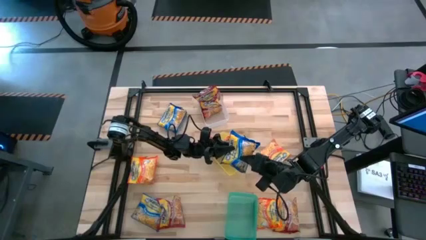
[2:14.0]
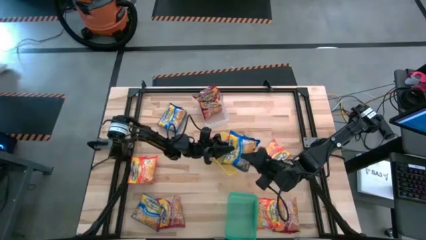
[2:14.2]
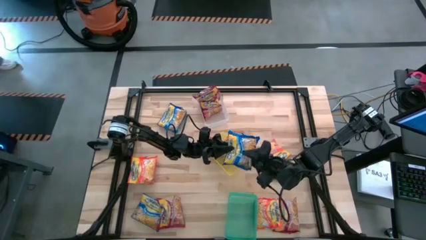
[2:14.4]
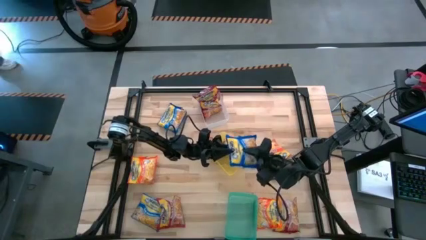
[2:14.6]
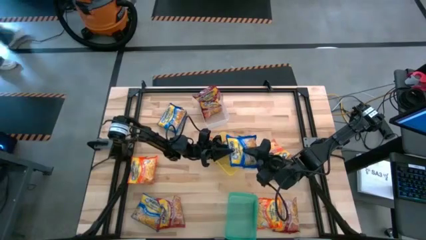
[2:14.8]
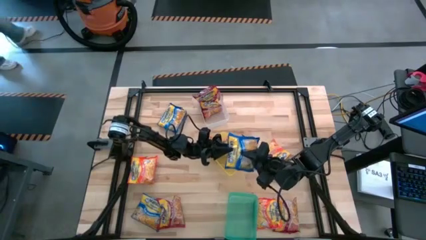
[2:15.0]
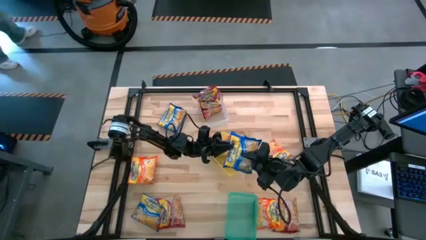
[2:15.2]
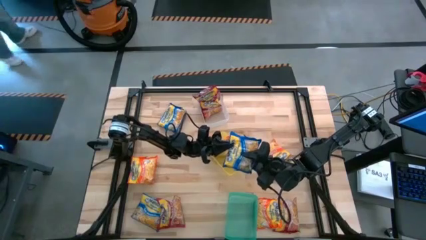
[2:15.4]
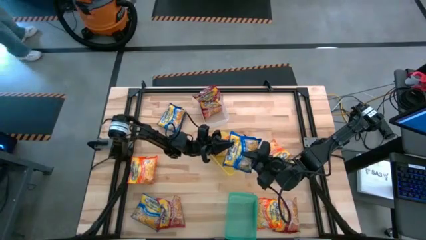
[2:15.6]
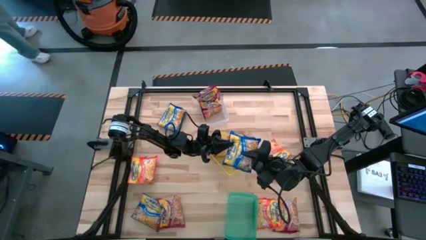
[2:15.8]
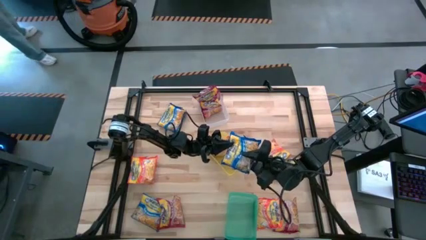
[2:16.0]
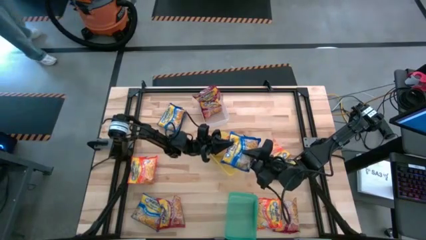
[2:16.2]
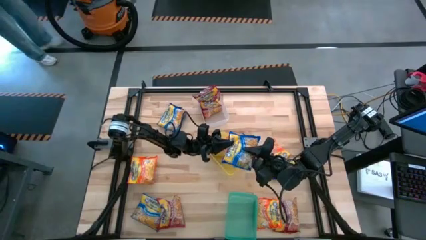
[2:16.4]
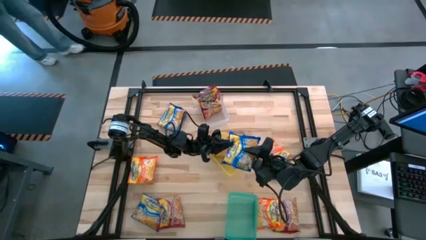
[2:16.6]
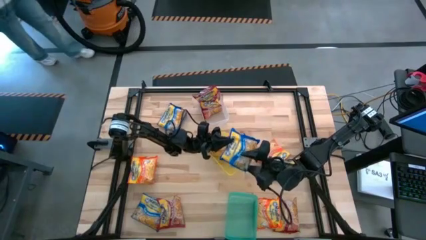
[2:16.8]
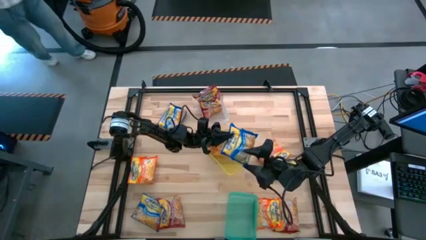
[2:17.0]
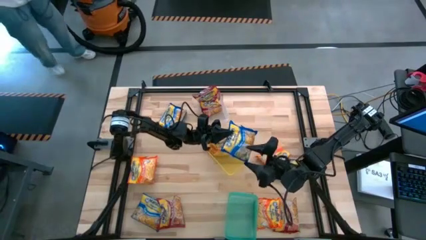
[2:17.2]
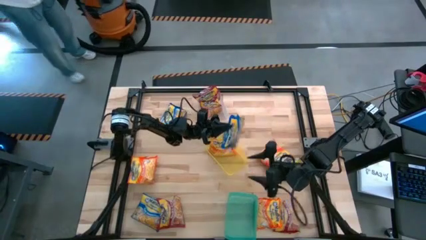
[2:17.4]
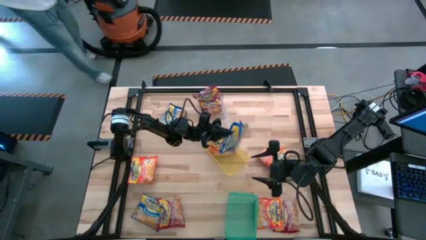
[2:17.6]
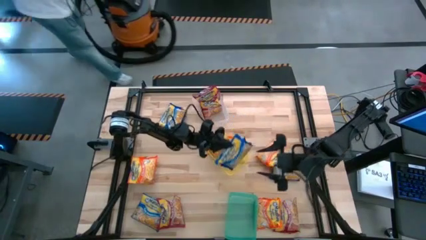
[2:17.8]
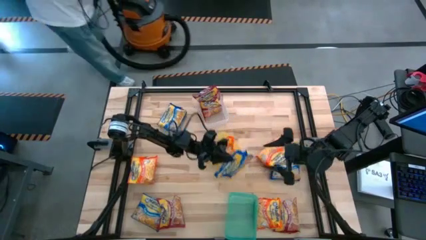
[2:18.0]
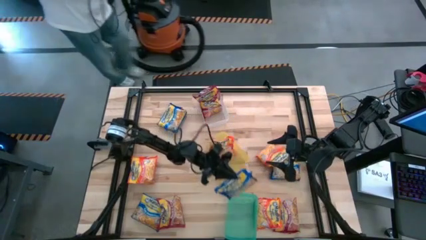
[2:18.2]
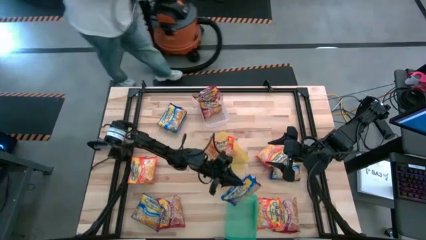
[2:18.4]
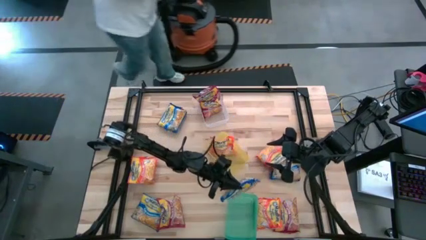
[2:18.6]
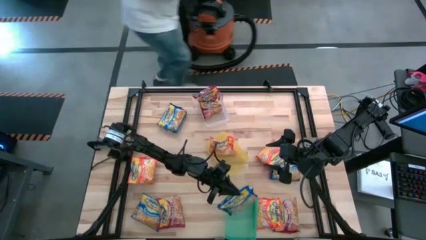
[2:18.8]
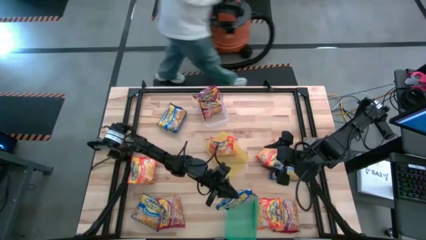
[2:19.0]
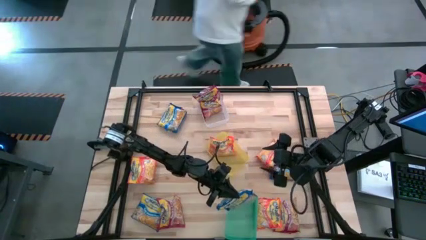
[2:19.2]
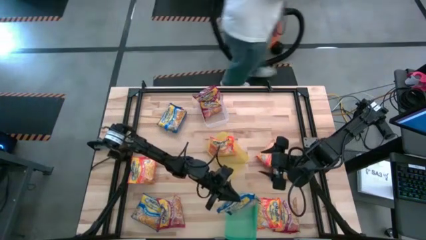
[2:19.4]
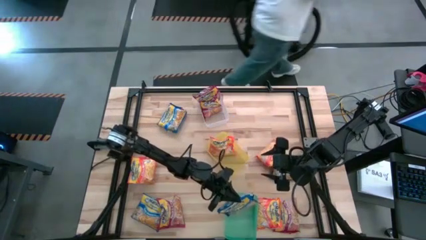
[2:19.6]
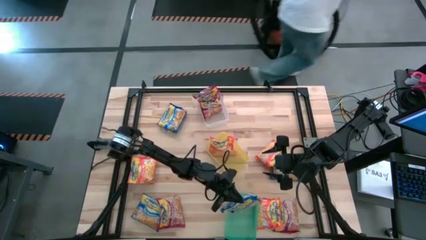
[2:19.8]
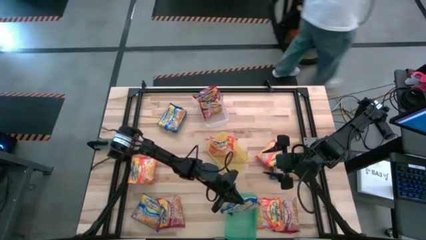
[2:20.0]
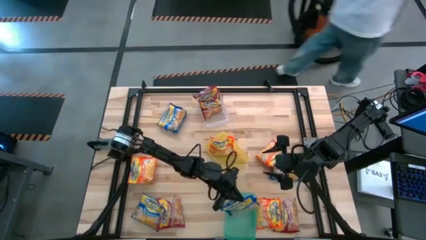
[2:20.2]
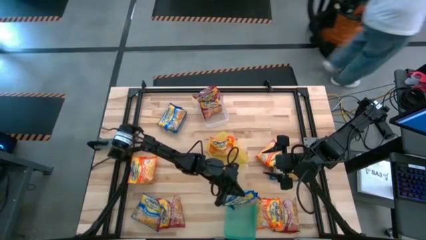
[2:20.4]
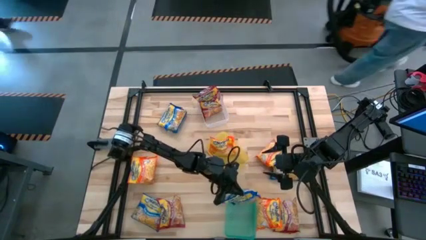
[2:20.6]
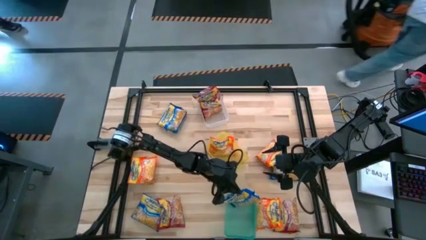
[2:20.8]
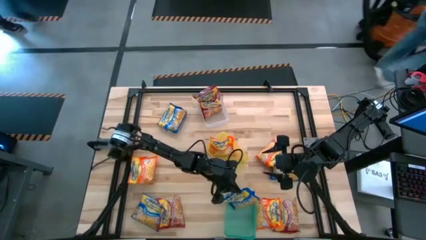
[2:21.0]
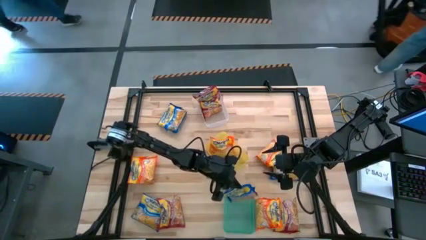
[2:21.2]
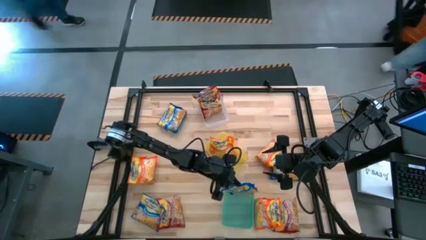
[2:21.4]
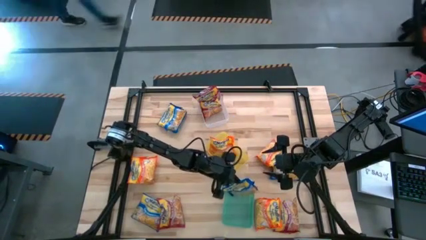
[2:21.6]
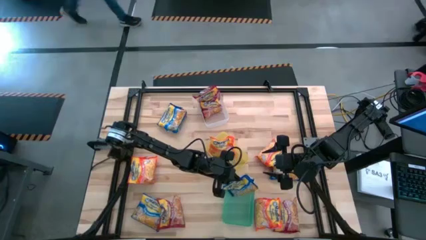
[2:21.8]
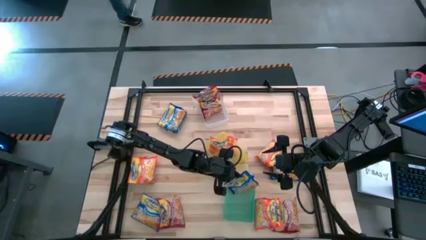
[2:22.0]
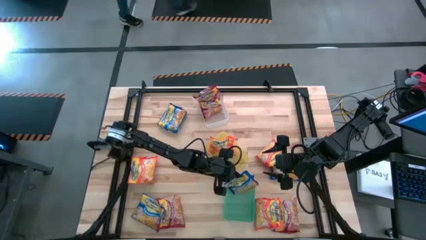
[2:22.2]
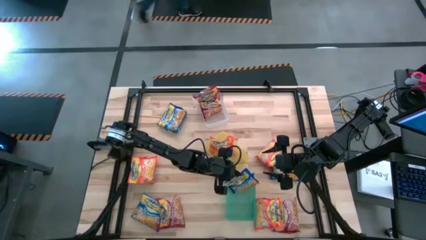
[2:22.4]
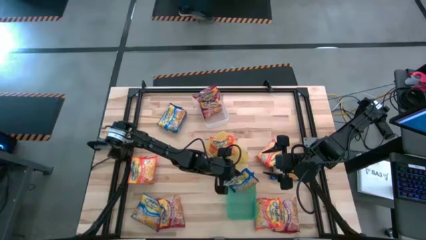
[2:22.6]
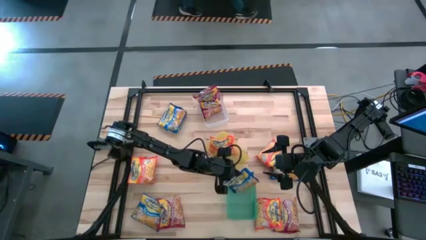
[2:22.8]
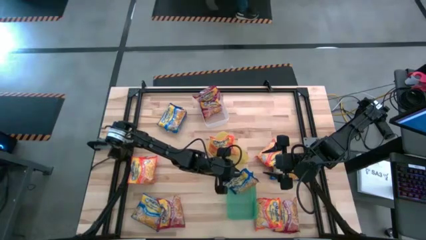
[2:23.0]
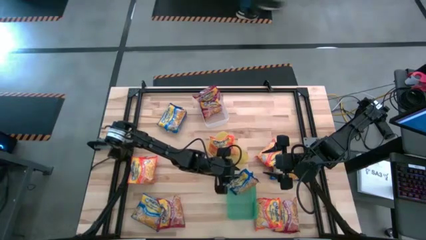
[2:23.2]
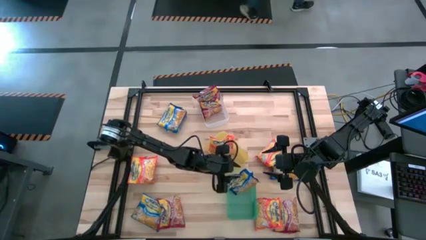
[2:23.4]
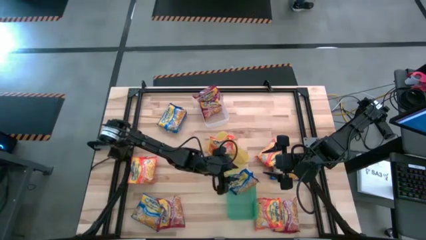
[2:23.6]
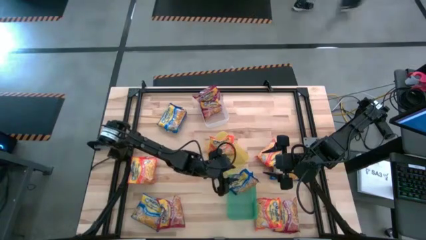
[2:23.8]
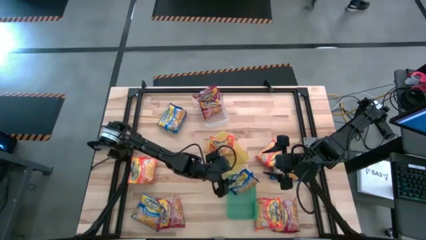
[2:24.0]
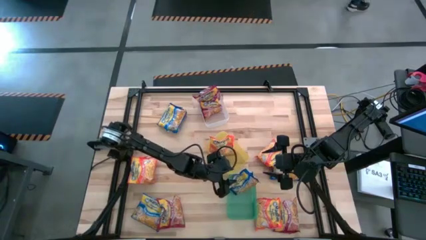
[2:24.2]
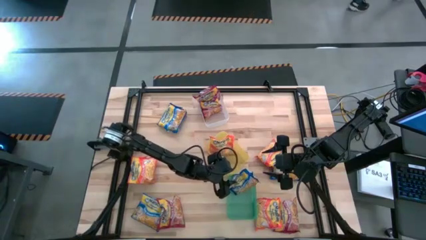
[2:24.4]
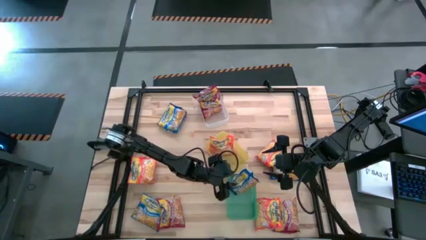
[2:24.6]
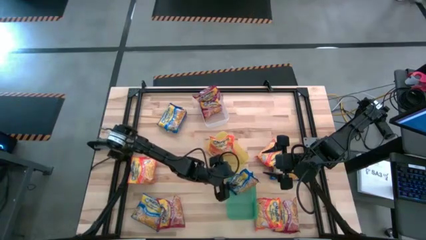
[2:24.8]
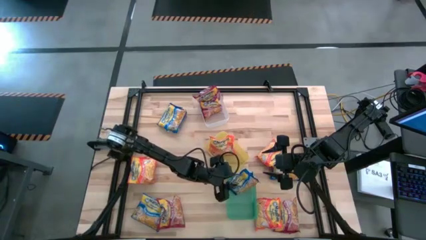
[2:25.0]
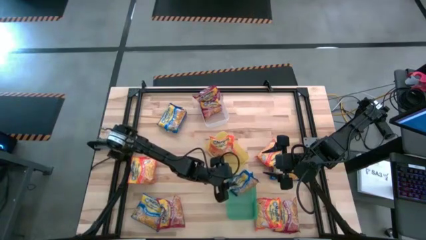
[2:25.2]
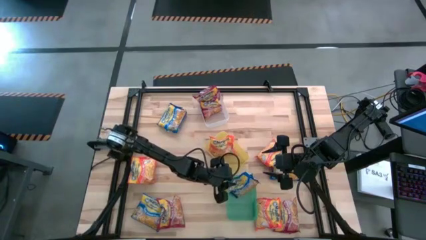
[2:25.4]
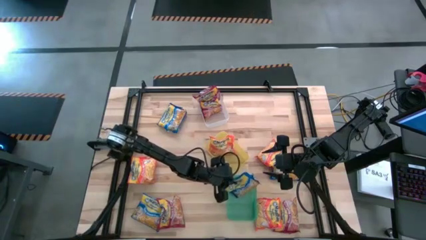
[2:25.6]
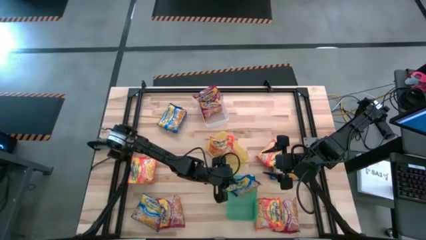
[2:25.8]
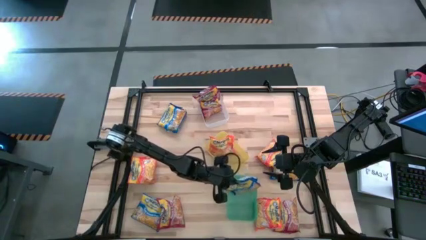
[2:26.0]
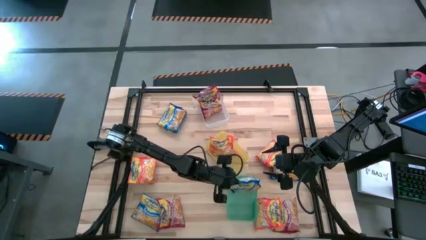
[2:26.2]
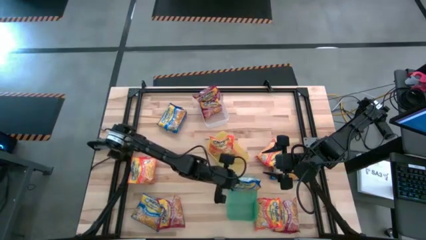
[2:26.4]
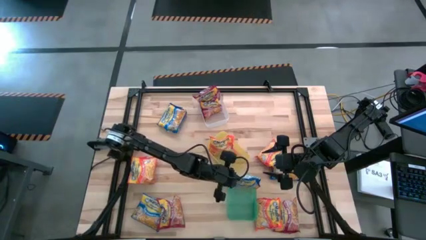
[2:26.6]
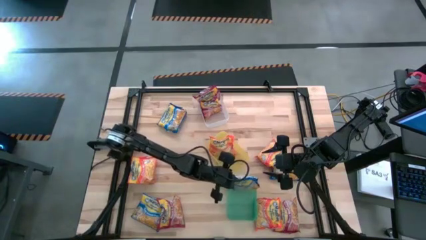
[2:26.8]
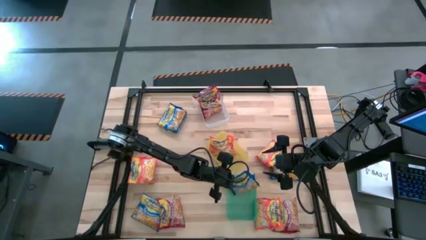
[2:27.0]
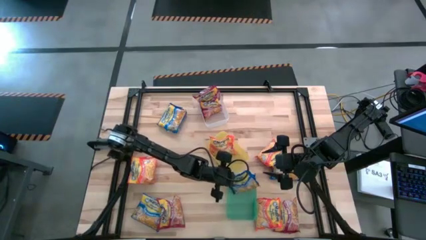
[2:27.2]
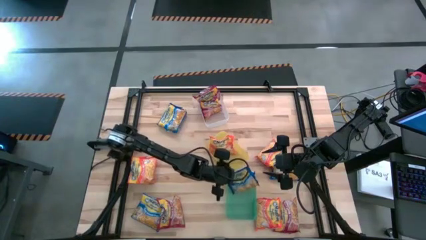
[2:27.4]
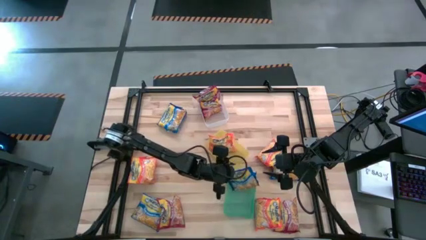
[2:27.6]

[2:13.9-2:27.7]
Task: Sort Maruchan noodles
Put the blue noodle pack into the green bin
